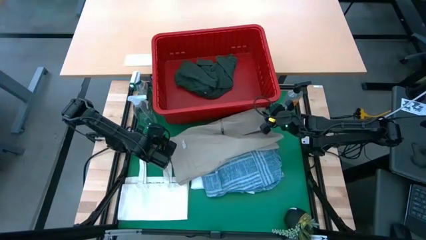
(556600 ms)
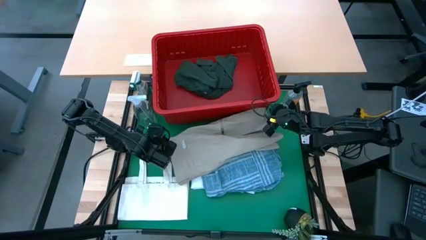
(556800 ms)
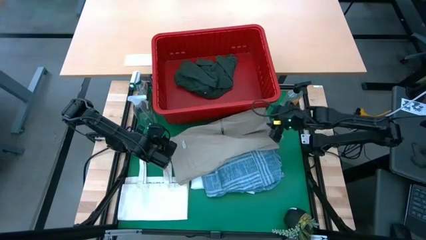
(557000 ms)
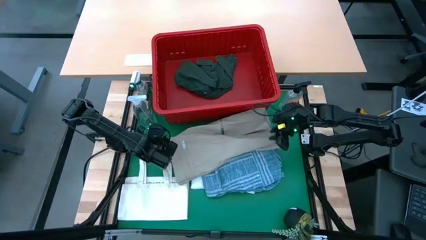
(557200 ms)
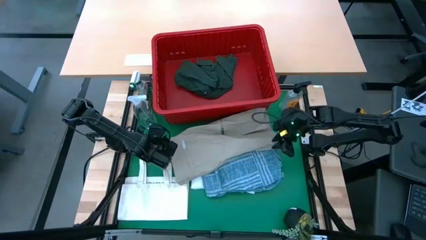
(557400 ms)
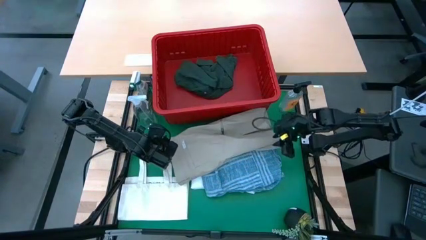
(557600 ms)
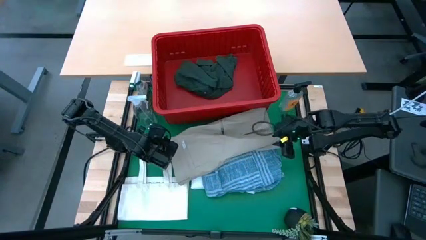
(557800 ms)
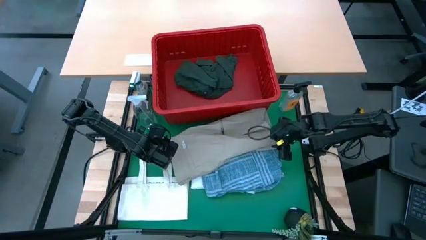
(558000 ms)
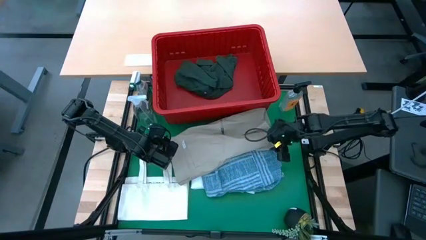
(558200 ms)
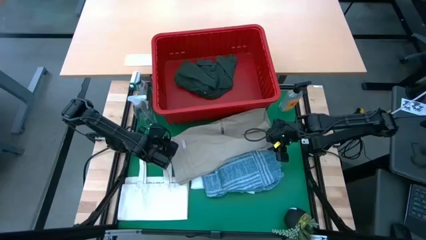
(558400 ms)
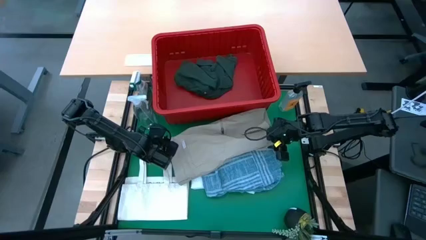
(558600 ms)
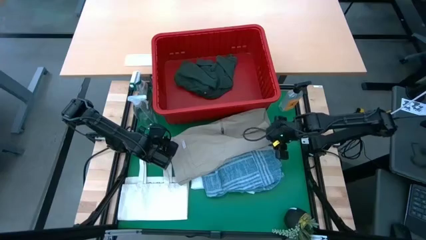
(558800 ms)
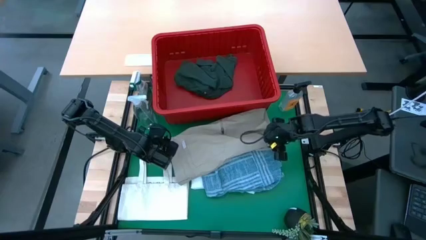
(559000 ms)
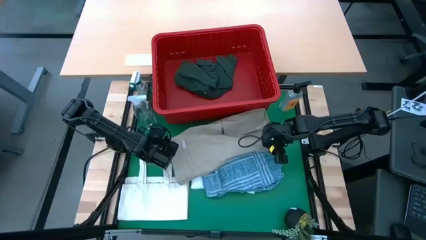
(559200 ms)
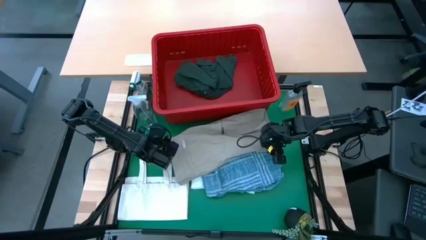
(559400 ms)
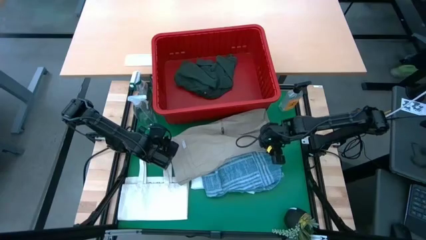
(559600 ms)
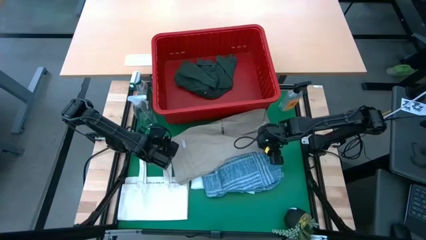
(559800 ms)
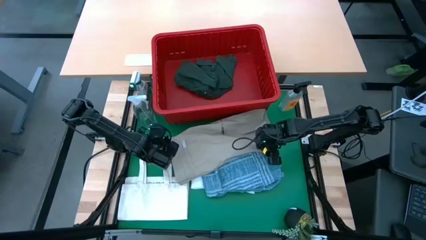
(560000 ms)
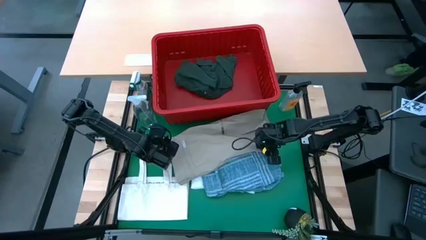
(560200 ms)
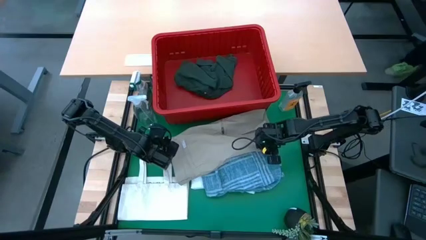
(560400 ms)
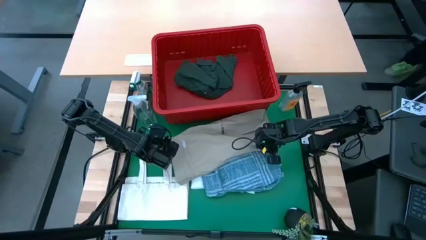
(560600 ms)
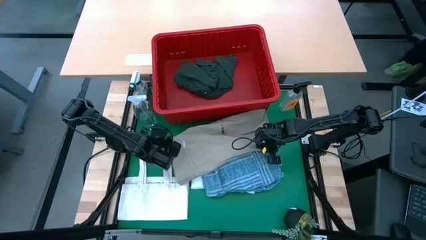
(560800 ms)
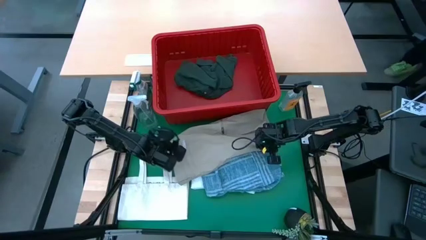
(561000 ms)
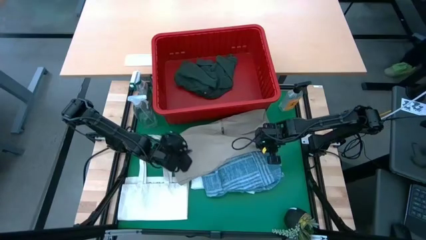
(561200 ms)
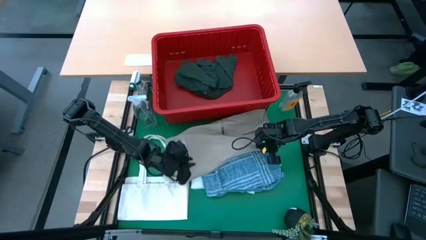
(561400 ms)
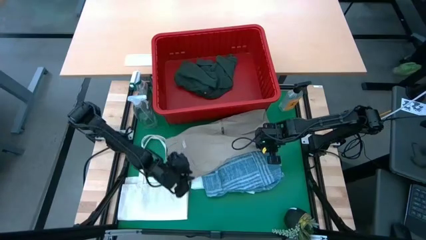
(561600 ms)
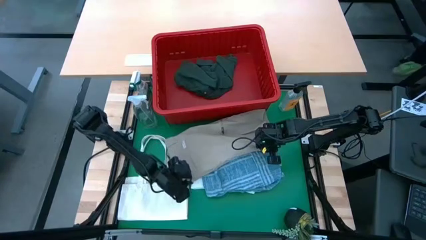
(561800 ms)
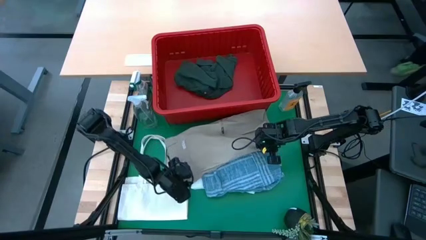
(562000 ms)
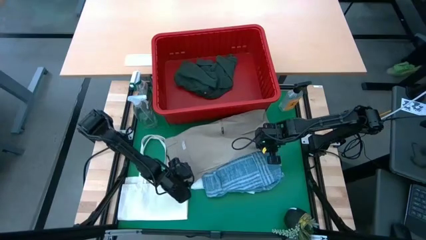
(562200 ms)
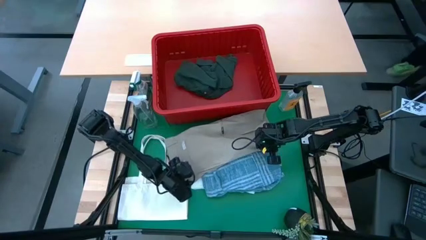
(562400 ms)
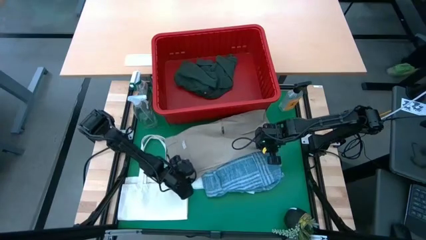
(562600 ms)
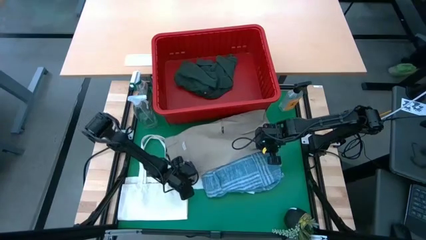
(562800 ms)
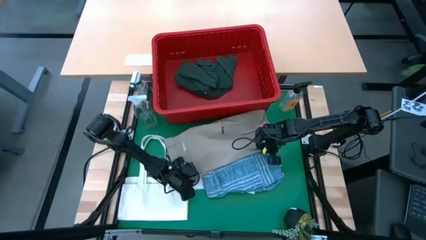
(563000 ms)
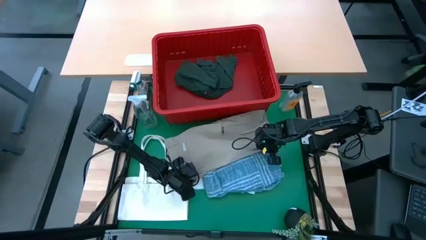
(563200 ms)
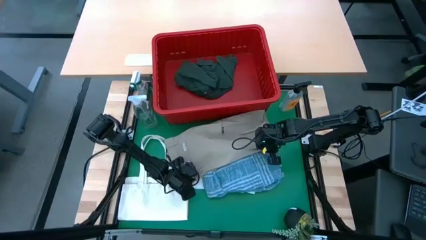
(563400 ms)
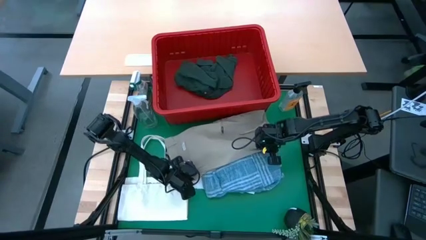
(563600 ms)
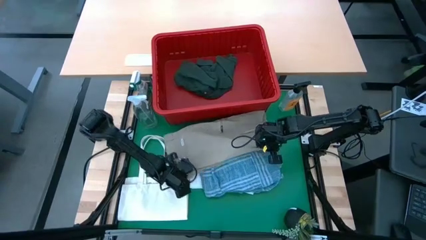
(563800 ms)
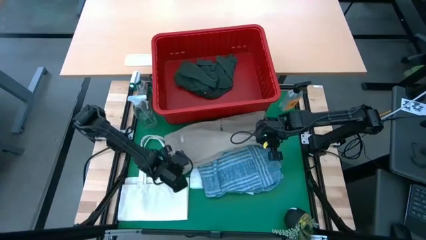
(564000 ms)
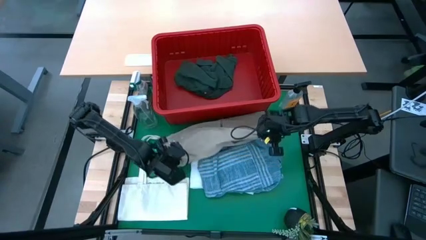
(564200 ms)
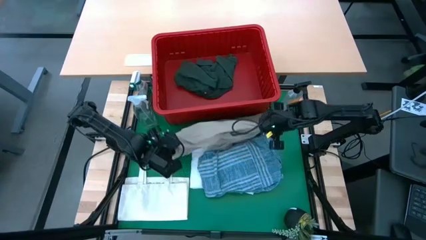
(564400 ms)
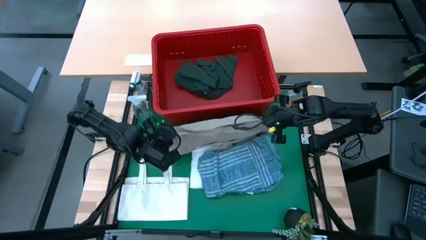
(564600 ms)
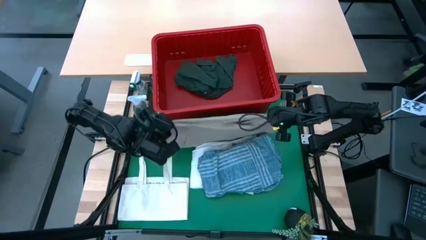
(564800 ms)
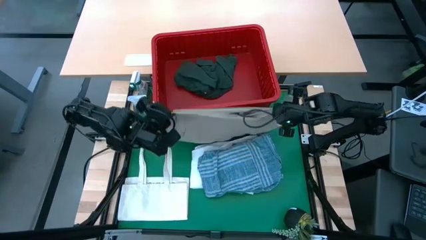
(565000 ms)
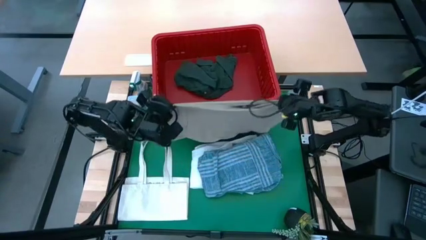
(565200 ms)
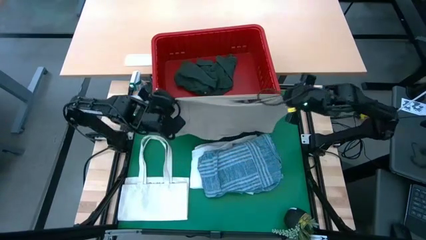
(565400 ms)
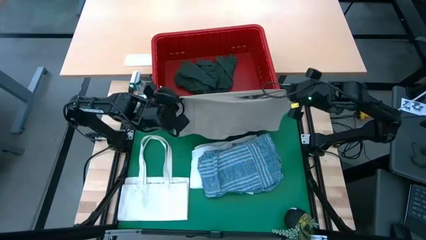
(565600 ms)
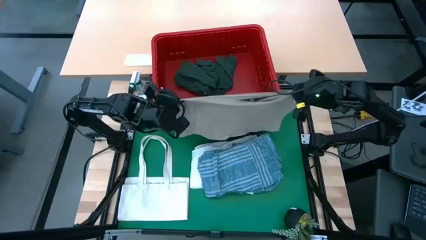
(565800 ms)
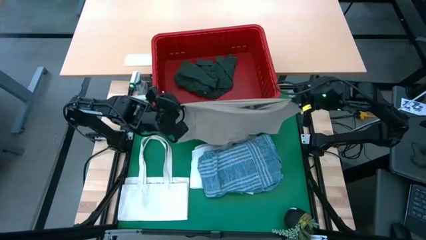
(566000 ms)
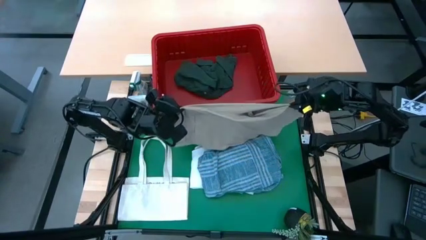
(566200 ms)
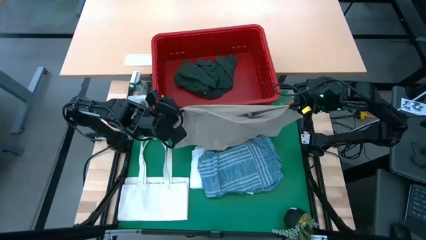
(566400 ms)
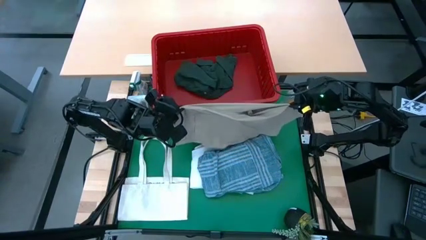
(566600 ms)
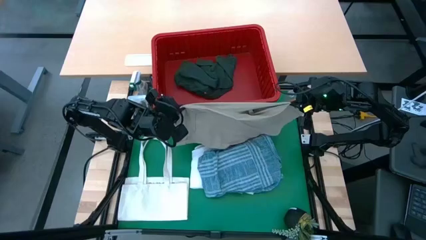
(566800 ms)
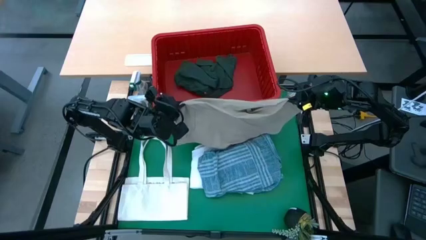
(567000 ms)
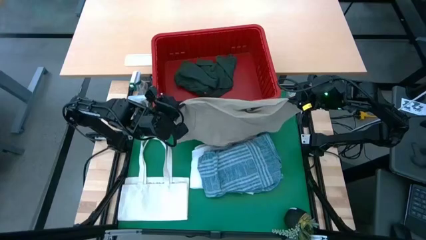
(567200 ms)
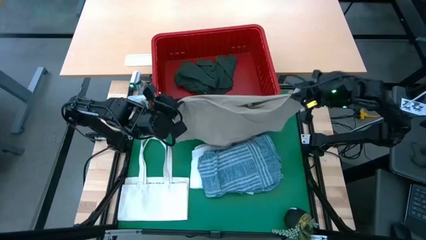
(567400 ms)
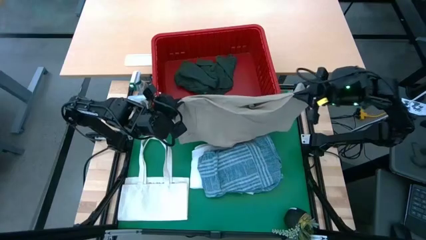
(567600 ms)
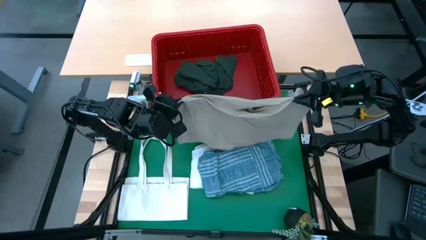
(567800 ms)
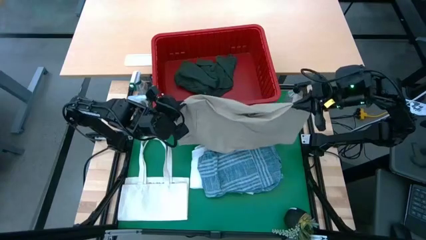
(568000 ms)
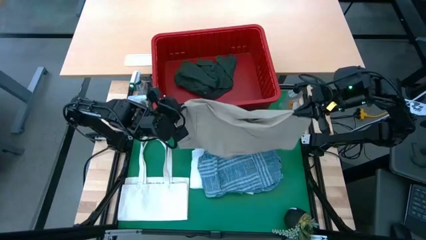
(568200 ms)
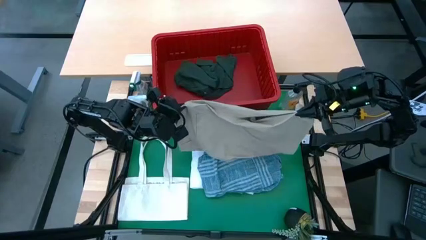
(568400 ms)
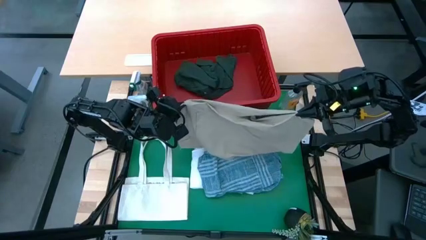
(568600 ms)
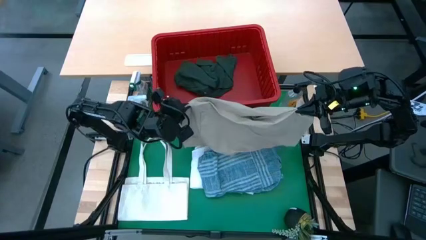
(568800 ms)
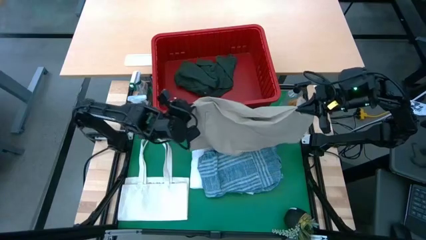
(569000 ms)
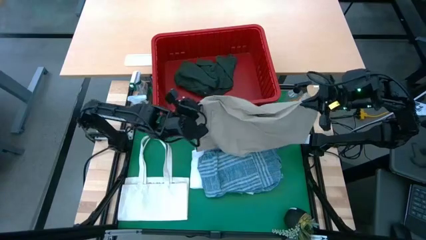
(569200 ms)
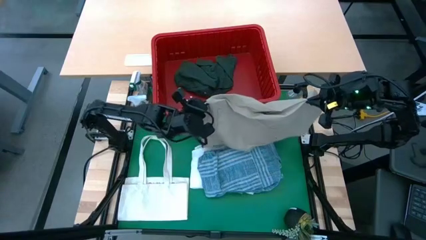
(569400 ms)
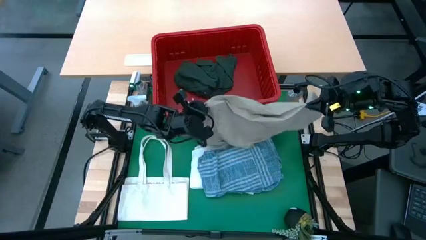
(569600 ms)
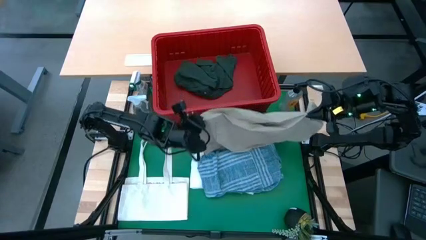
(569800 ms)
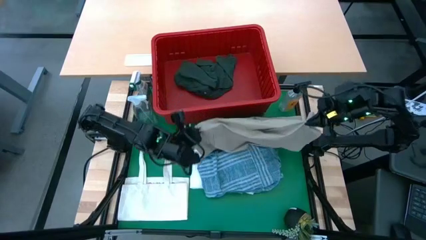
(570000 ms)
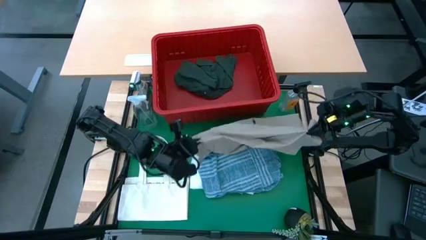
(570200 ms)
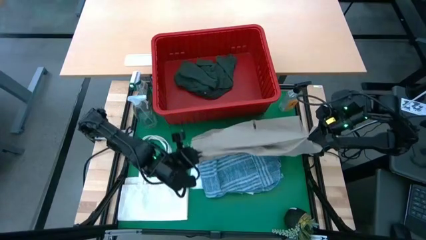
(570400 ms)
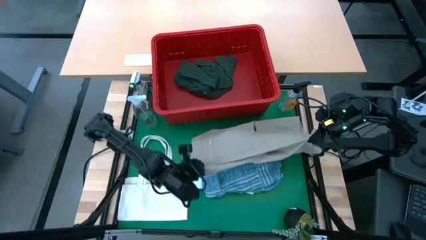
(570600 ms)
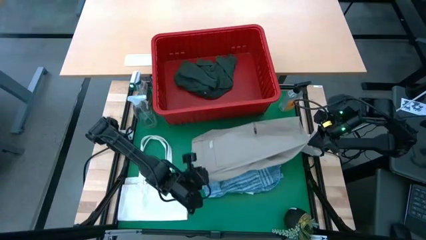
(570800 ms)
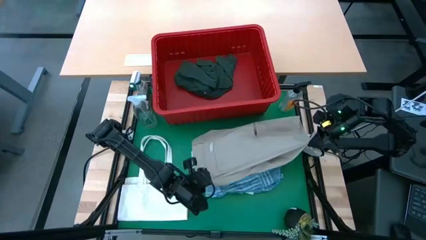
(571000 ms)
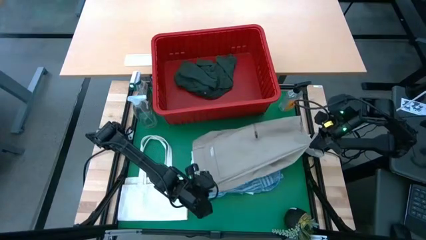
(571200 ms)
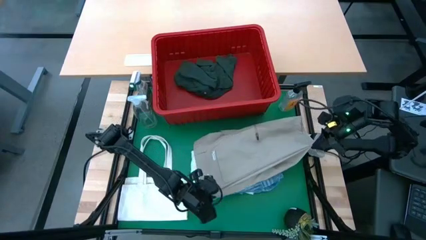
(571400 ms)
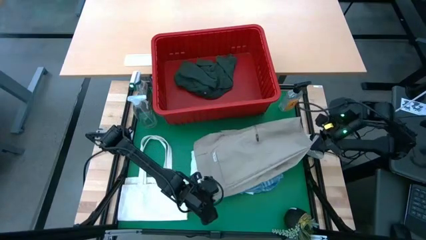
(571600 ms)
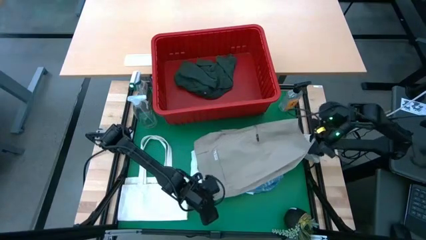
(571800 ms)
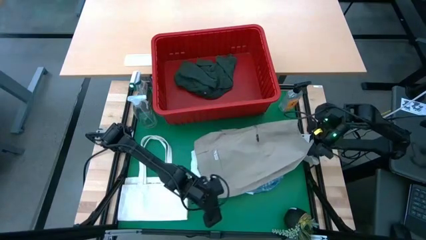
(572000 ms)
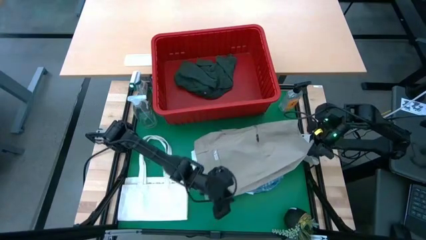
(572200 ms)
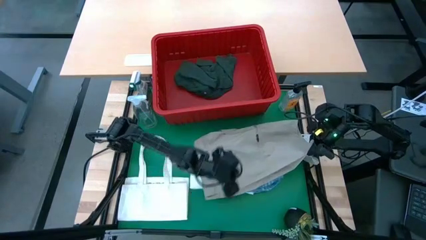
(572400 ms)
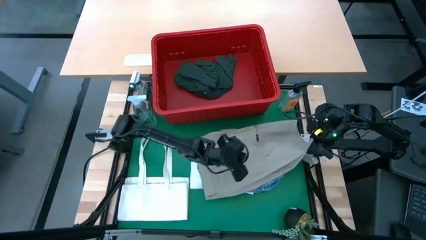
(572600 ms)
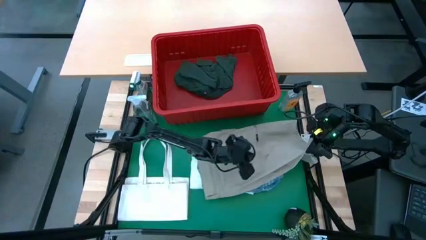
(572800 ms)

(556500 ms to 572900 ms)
Task: Fold Laundry from Bin
Fold the light brown shorts
